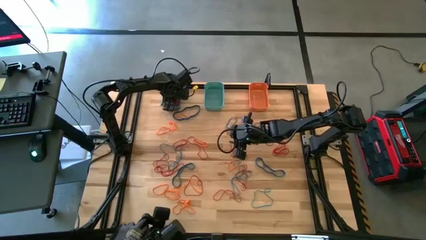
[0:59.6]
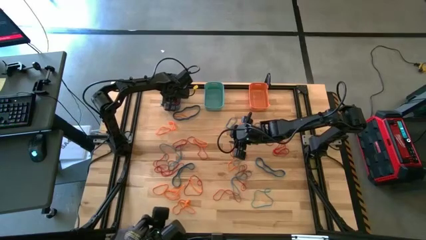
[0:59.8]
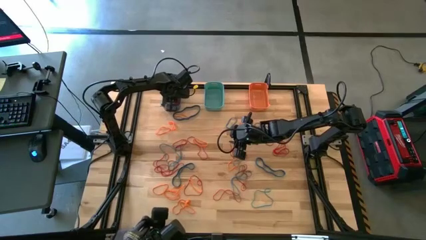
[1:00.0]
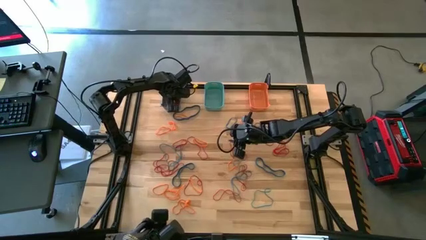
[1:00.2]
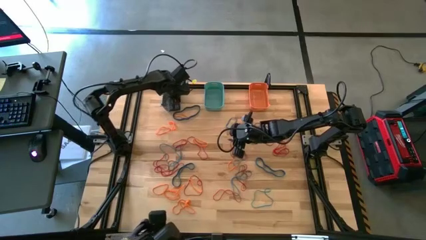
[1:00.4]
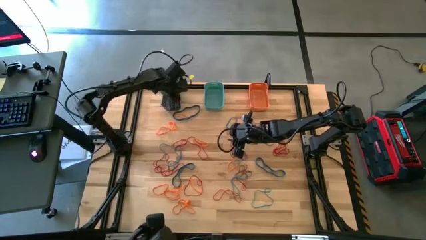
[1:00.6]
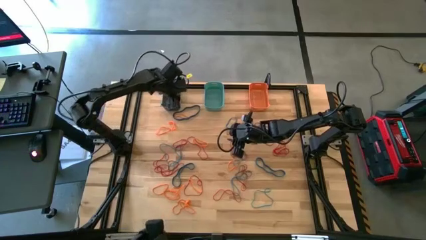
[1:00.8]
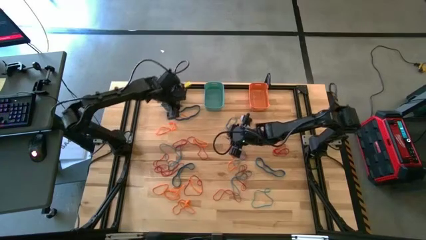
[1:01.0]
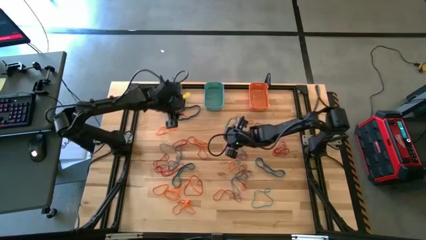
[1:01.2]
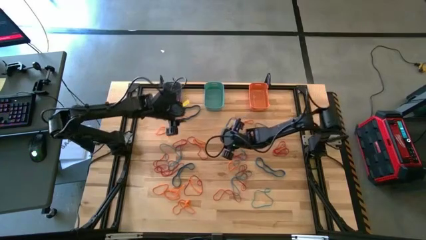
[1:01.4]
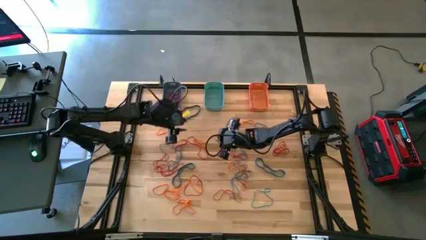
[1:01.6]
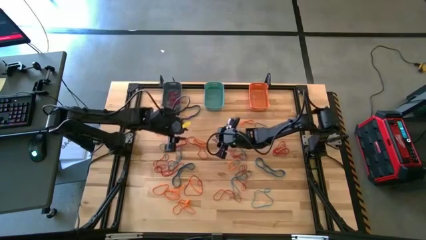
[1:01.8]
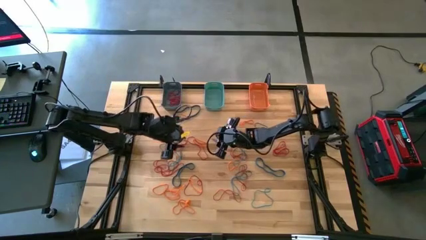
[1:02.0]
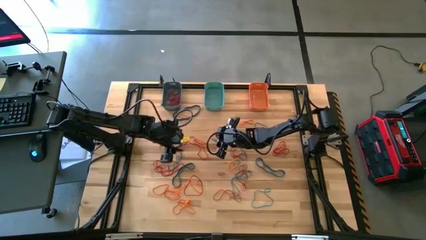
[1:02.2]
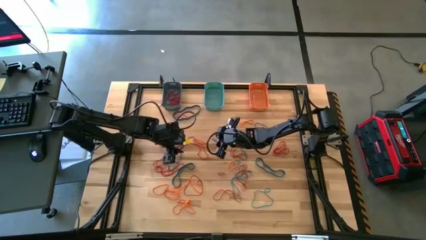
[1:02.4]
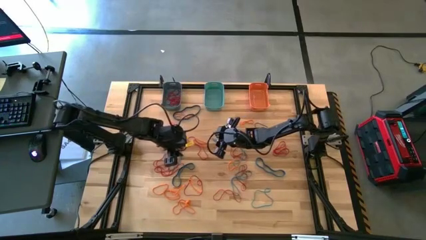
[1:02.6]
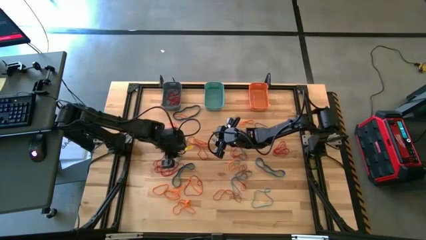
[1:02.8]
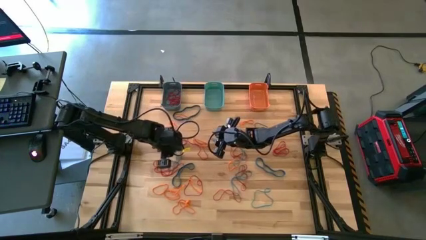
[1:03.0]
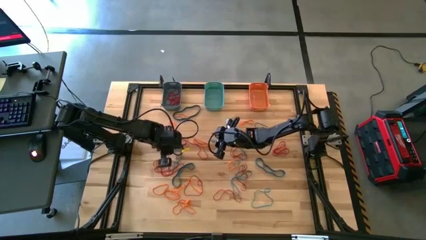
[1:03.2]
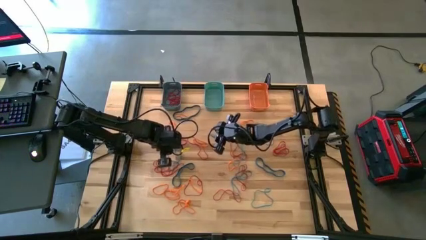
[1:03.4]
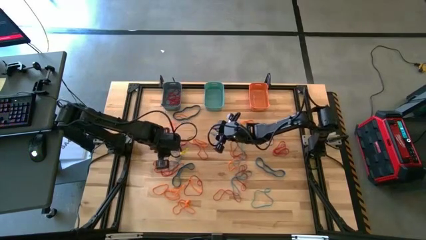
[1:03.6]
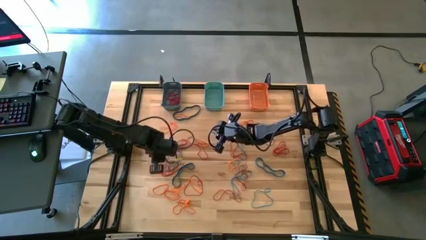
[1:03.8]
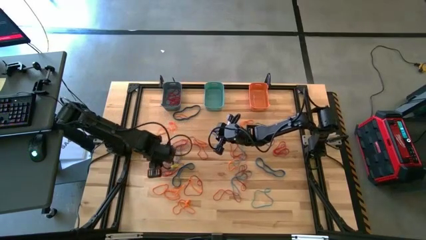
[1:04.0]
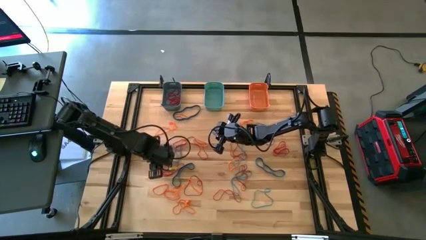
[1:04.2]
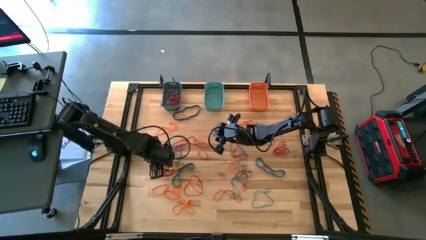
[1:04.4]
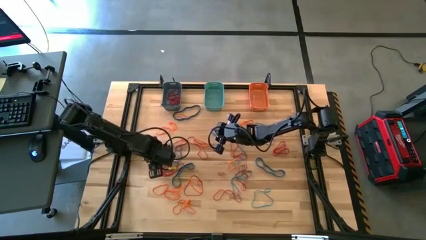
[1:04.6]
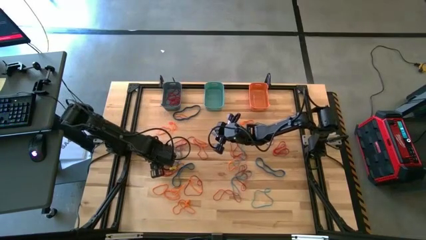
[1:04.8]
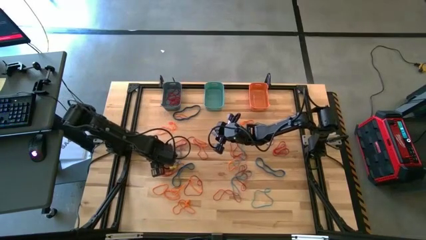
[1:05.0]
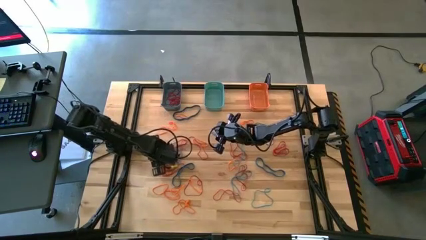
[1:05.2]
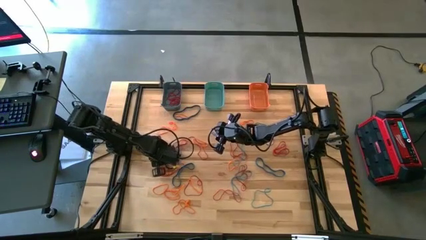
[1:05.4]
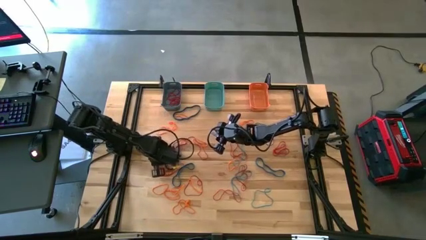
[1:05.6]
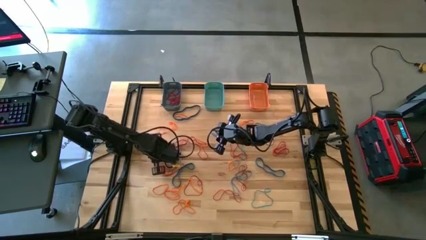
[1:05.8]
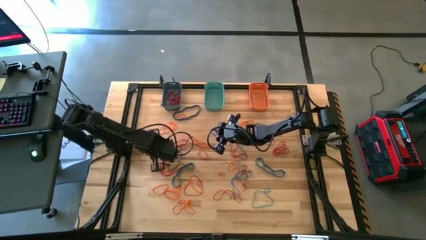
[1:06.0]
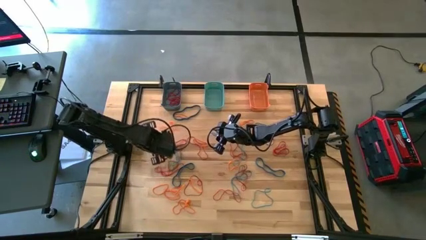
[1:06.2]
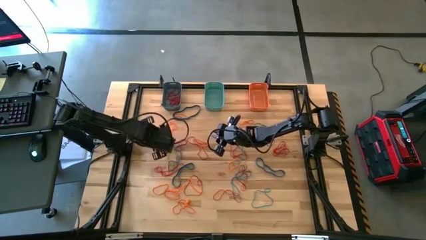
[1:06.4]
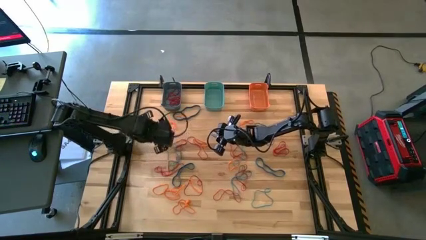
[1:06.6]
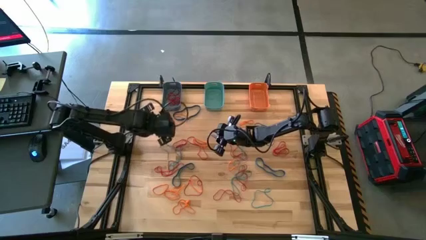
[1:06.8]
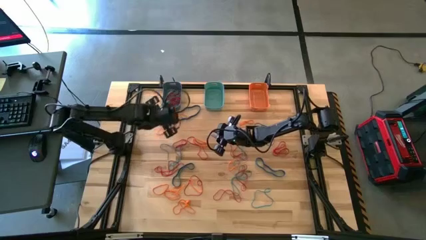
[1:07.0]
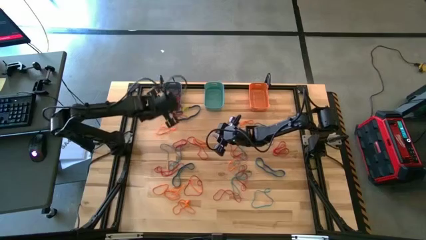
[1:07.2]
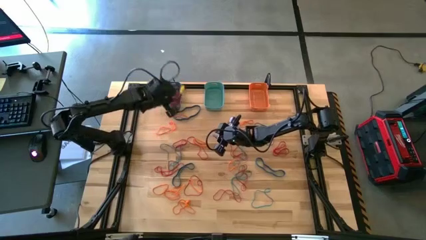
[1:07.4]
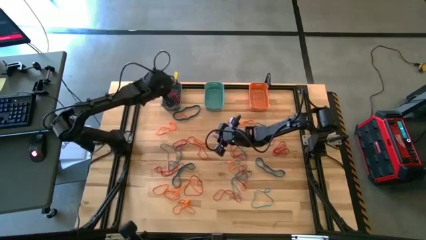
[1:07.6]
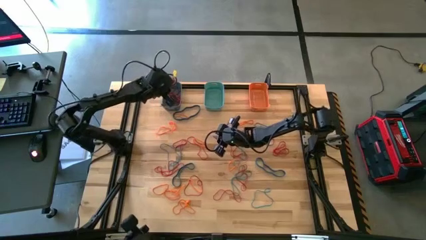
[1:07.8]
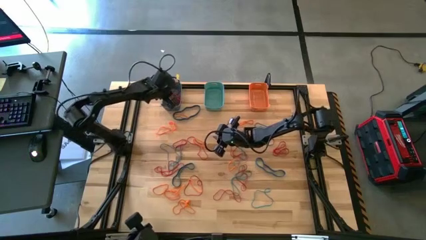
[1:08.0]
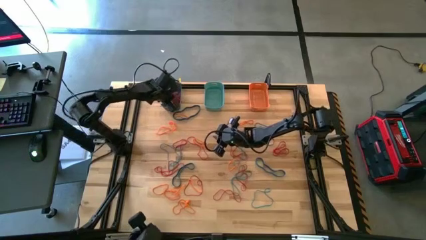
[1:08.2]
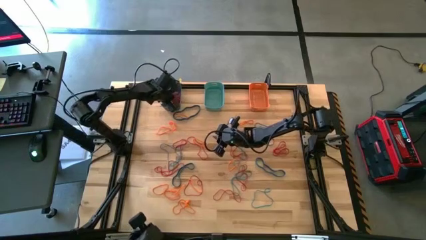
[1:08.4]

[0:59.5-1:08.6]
Task: Sort rubber bands into baskets
Put the red rubber band into the blue bin

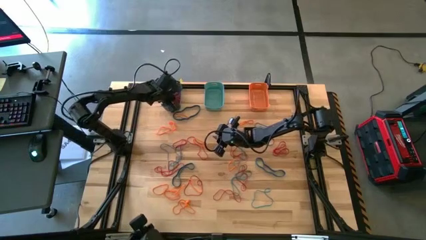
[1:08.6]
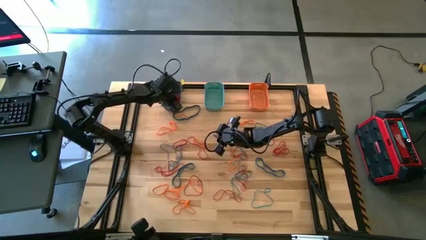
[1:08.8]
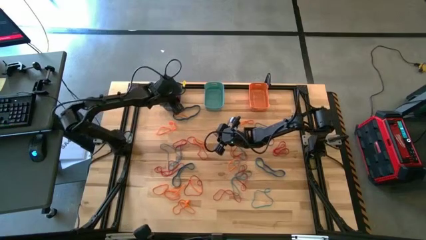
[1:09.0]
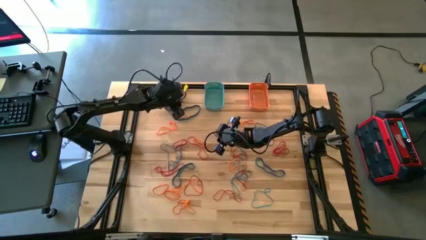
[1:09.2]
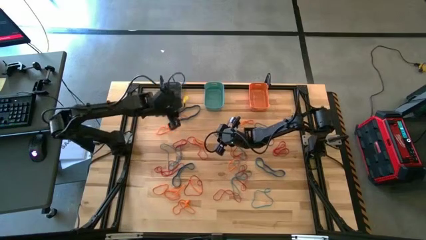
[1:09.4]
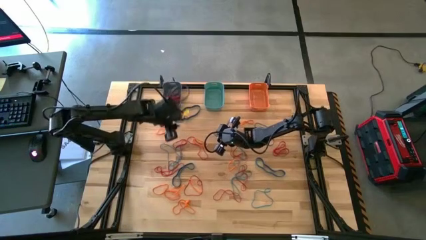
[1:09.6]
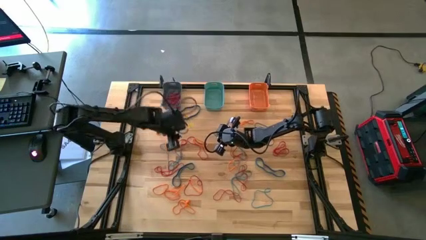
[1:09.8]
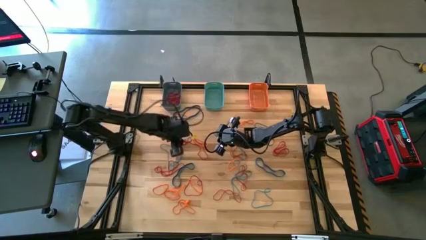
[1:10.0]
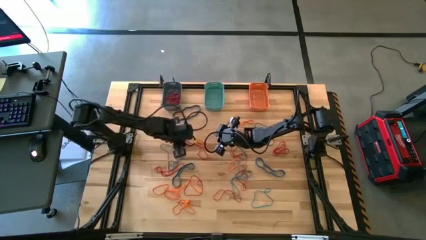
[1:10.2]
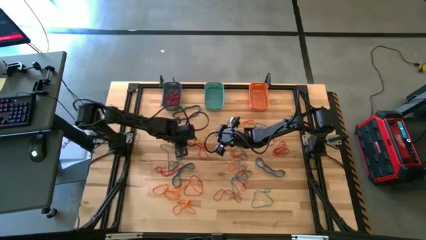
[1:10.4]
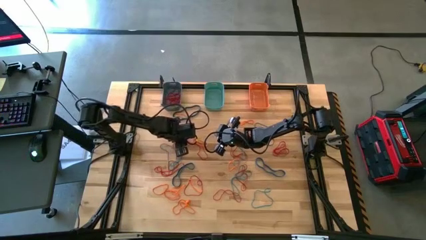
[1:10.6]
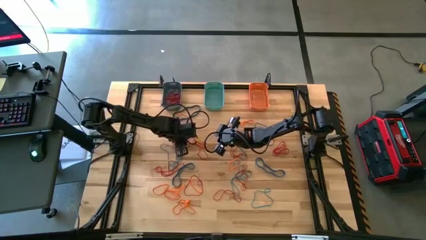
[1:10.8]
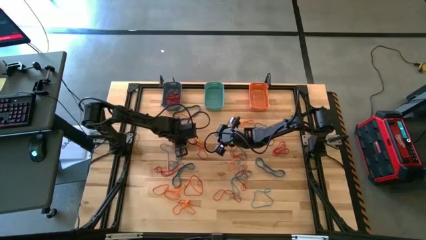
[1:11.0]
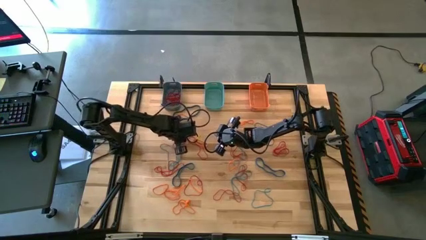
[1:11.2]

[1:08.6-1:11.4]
Put the red rubber band into the blue bin
